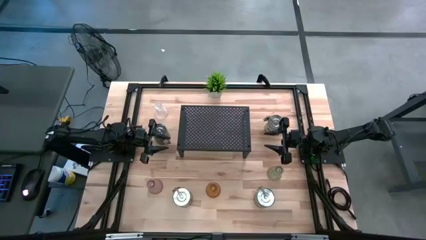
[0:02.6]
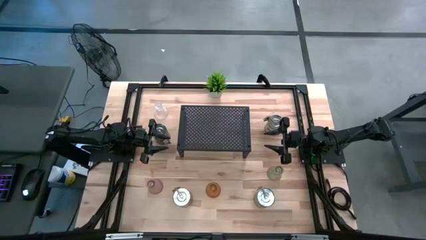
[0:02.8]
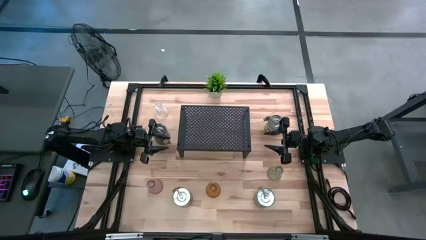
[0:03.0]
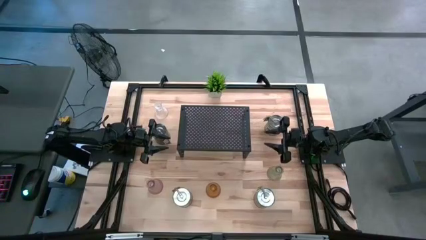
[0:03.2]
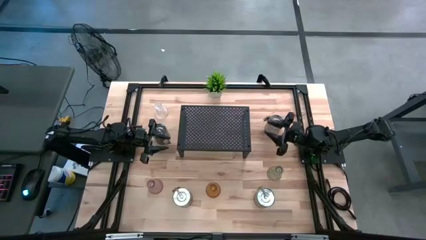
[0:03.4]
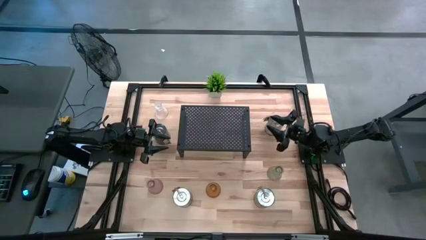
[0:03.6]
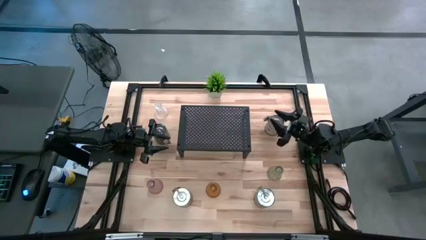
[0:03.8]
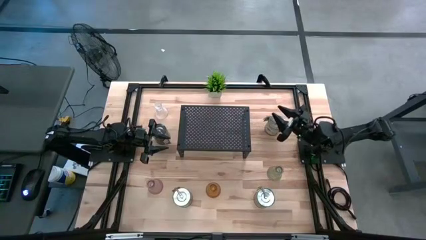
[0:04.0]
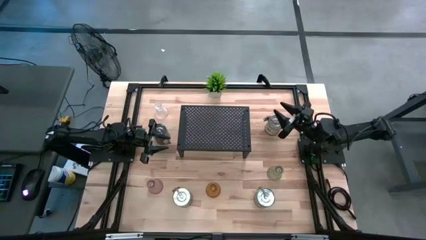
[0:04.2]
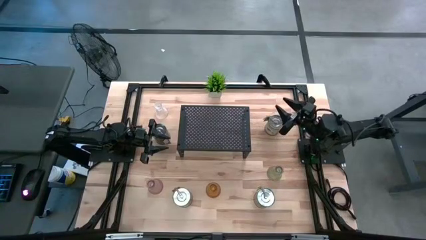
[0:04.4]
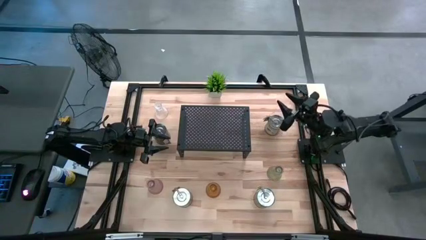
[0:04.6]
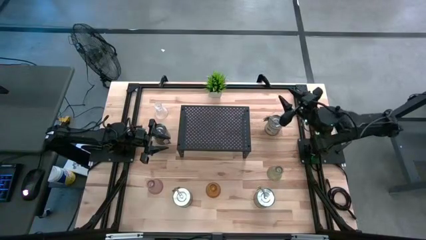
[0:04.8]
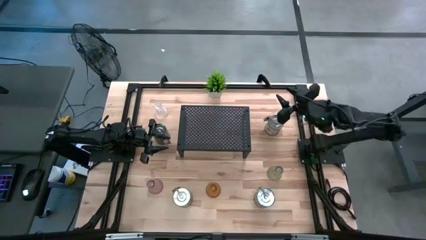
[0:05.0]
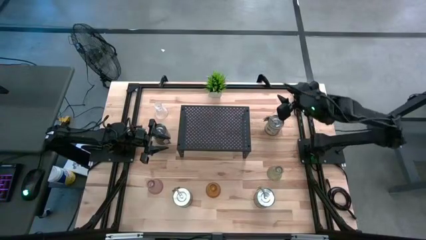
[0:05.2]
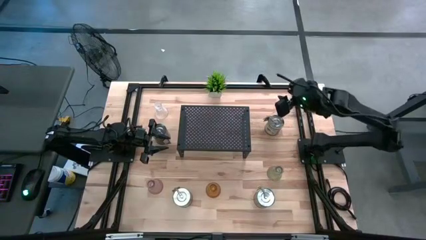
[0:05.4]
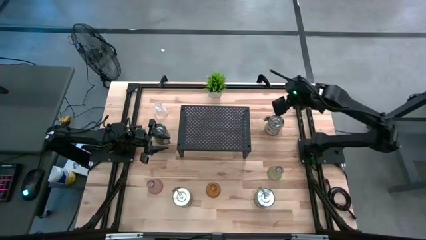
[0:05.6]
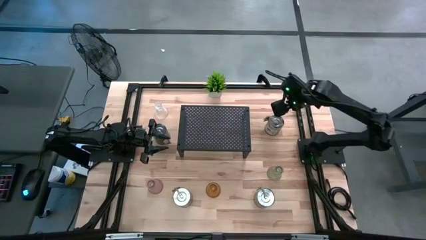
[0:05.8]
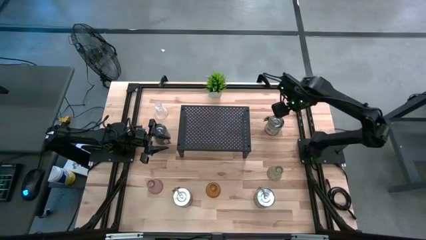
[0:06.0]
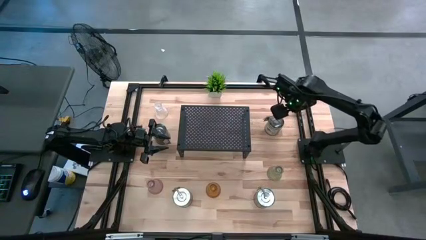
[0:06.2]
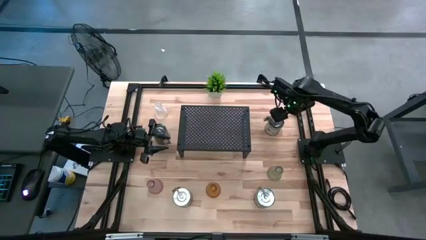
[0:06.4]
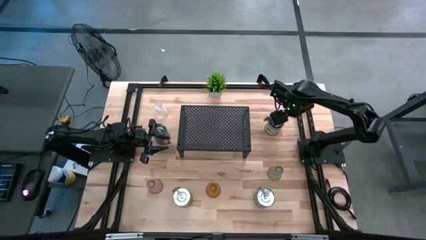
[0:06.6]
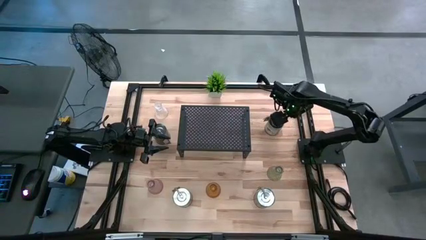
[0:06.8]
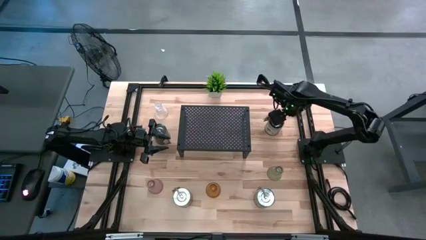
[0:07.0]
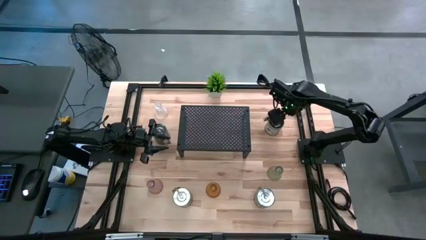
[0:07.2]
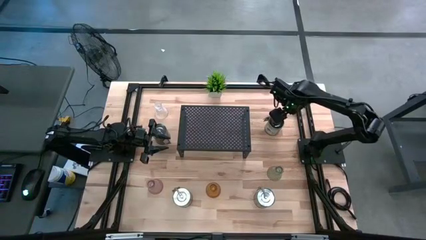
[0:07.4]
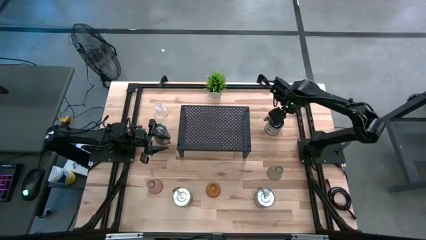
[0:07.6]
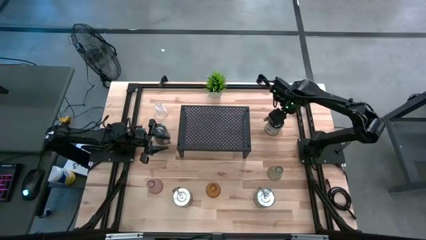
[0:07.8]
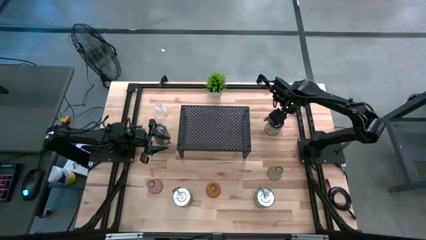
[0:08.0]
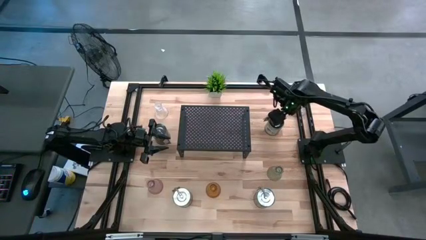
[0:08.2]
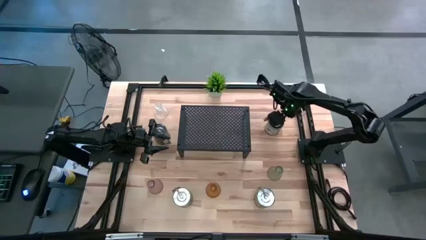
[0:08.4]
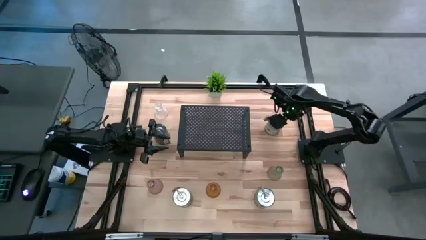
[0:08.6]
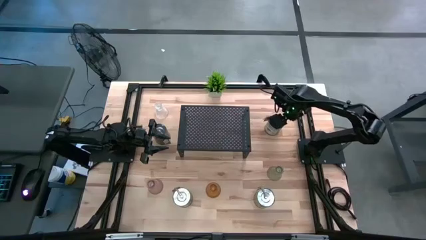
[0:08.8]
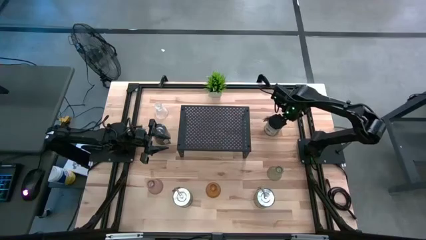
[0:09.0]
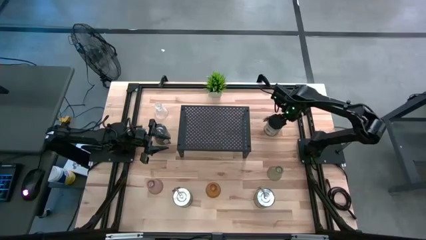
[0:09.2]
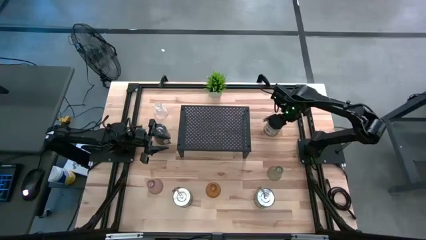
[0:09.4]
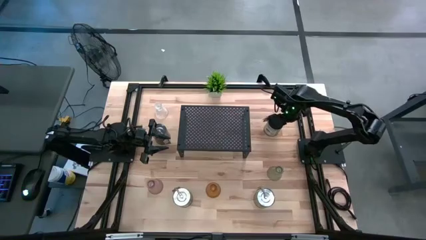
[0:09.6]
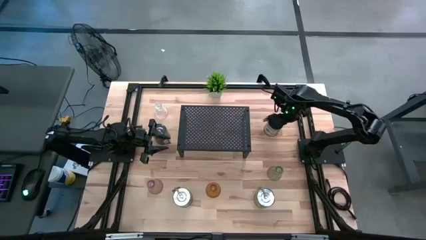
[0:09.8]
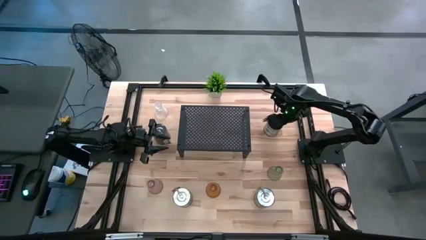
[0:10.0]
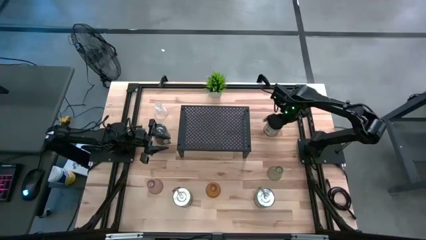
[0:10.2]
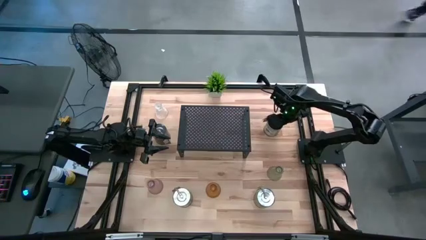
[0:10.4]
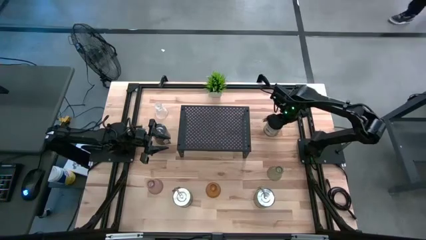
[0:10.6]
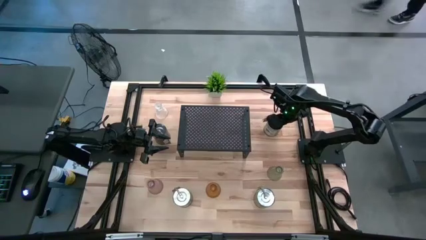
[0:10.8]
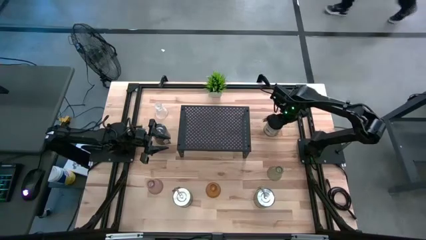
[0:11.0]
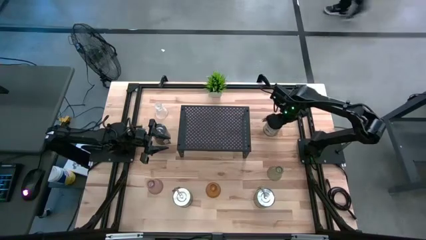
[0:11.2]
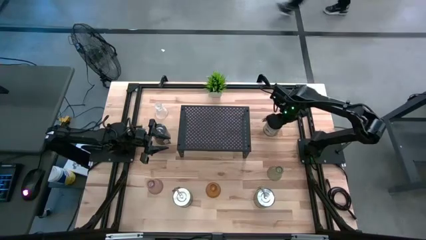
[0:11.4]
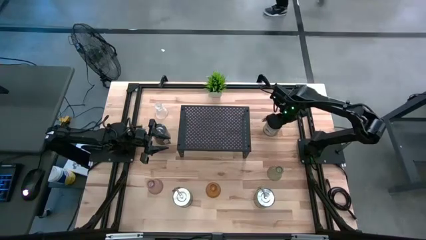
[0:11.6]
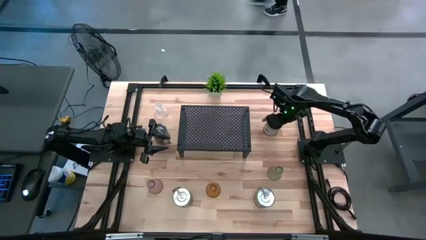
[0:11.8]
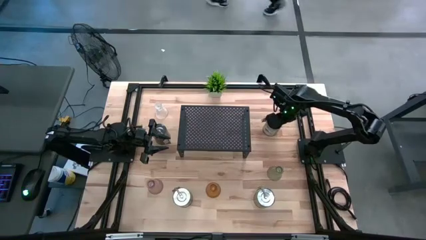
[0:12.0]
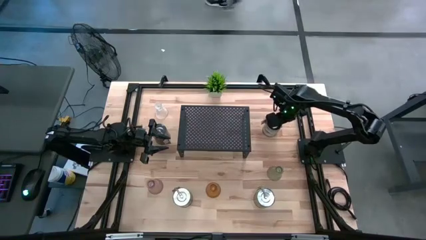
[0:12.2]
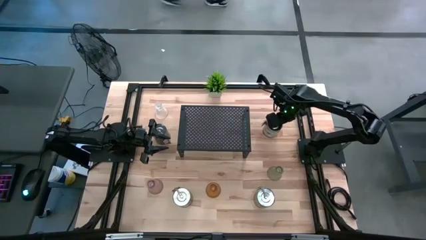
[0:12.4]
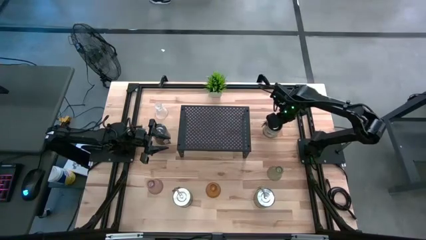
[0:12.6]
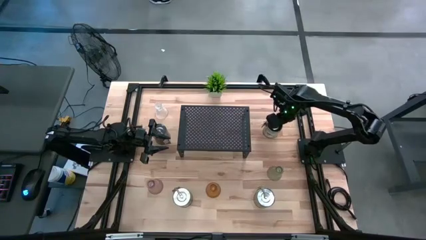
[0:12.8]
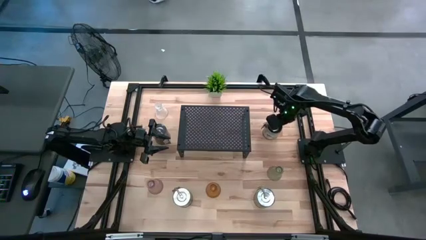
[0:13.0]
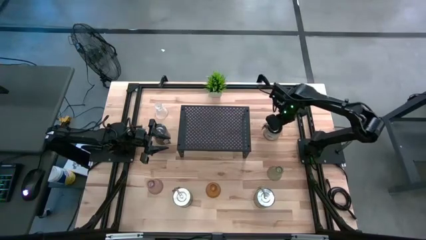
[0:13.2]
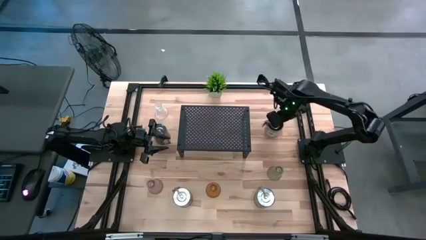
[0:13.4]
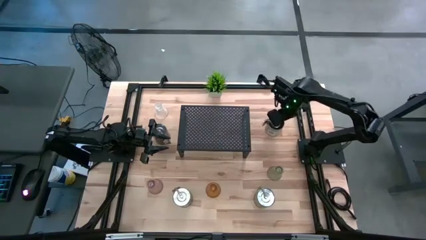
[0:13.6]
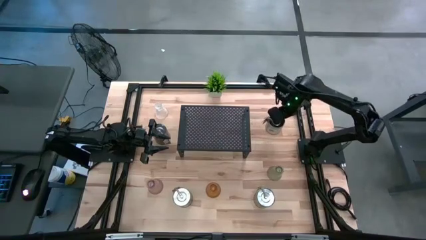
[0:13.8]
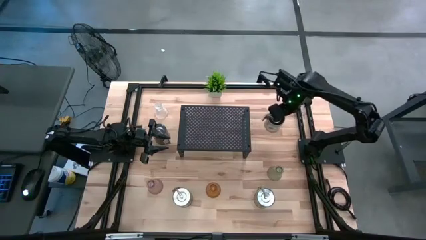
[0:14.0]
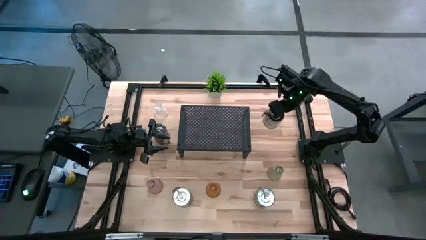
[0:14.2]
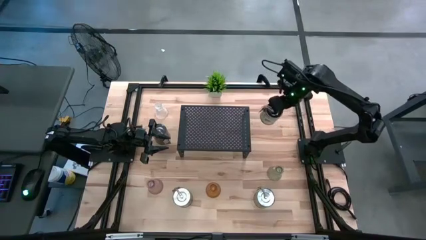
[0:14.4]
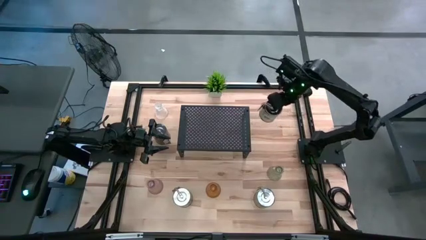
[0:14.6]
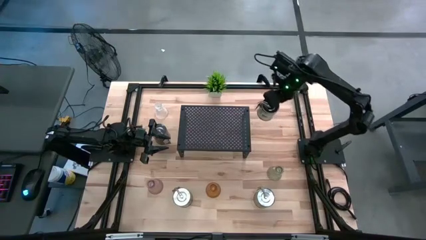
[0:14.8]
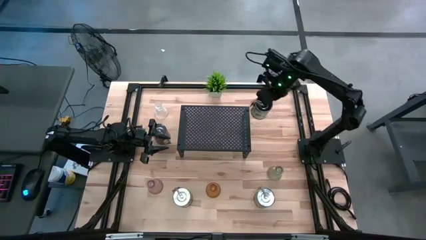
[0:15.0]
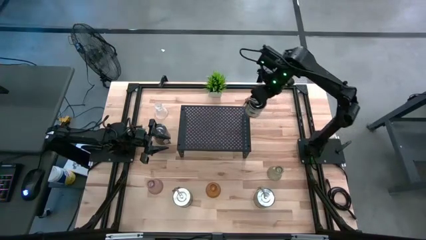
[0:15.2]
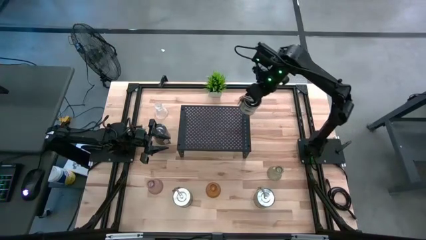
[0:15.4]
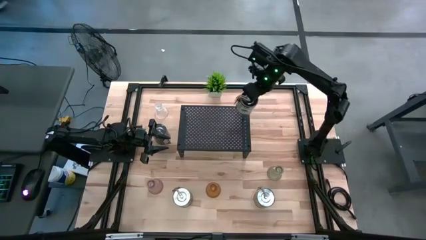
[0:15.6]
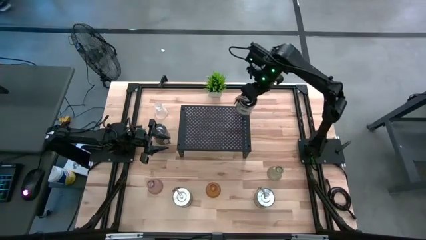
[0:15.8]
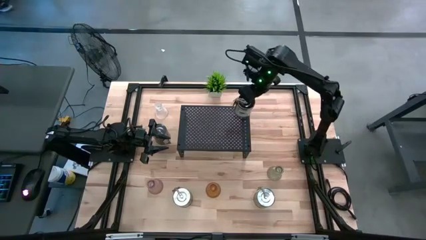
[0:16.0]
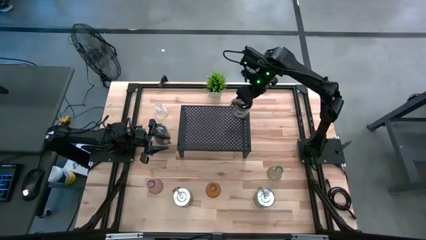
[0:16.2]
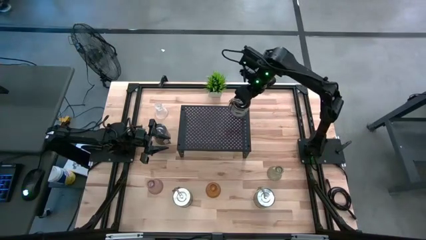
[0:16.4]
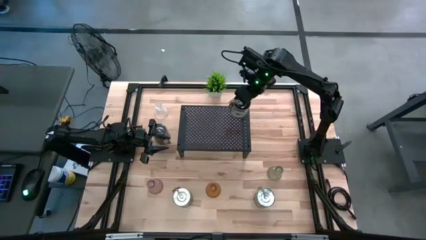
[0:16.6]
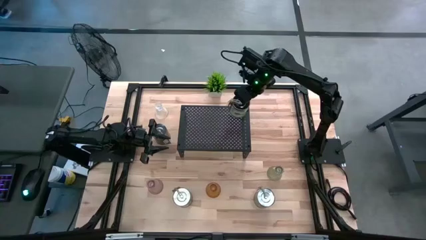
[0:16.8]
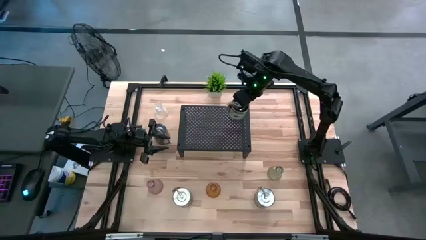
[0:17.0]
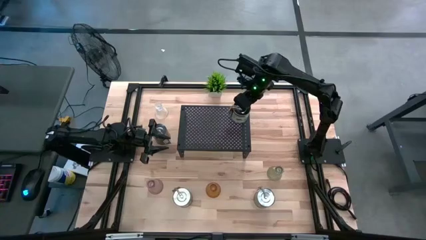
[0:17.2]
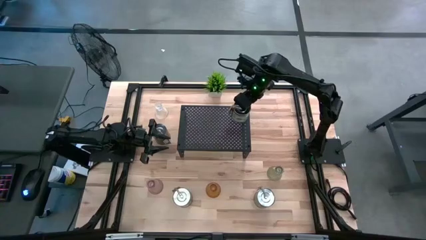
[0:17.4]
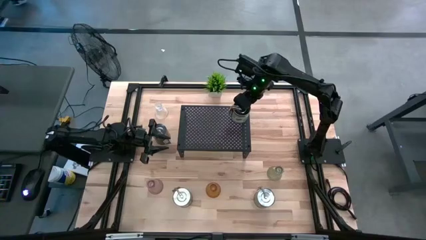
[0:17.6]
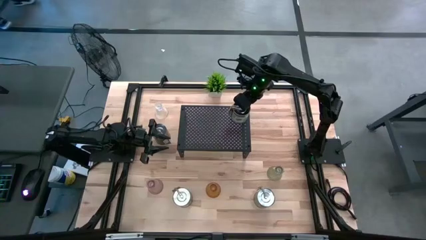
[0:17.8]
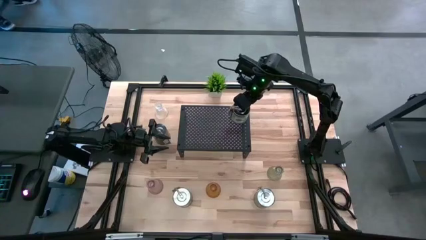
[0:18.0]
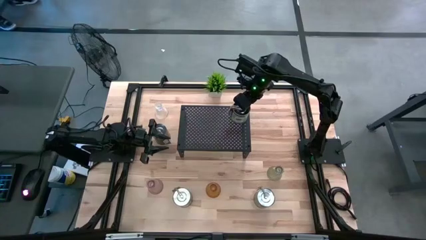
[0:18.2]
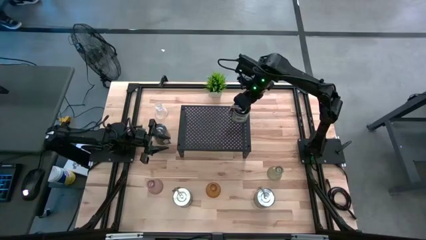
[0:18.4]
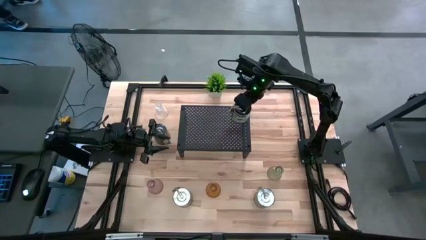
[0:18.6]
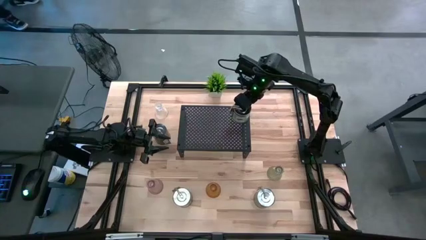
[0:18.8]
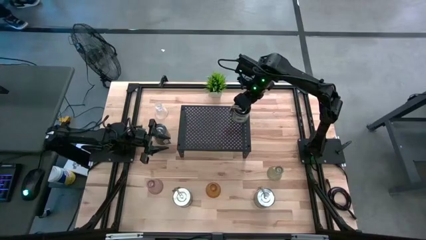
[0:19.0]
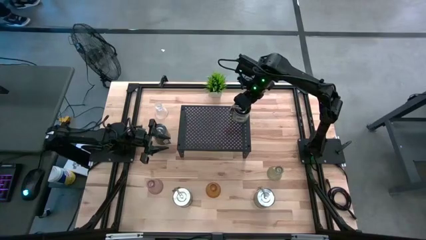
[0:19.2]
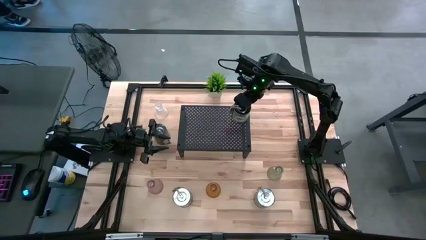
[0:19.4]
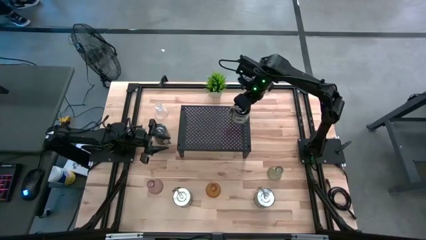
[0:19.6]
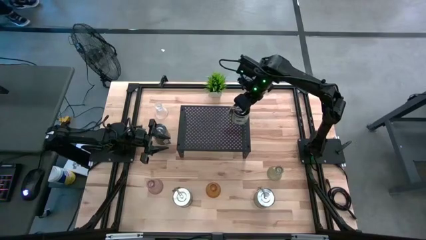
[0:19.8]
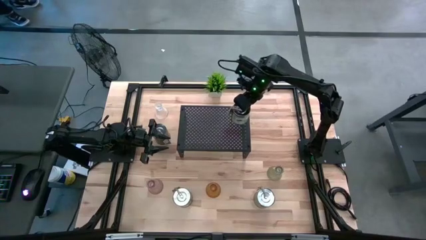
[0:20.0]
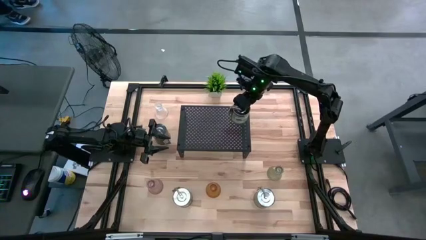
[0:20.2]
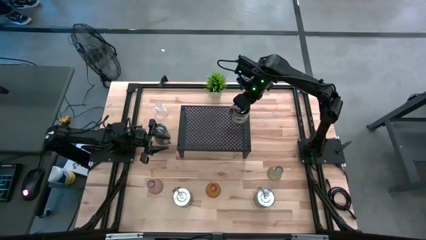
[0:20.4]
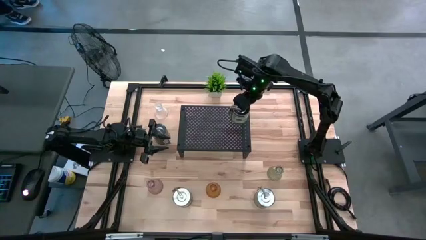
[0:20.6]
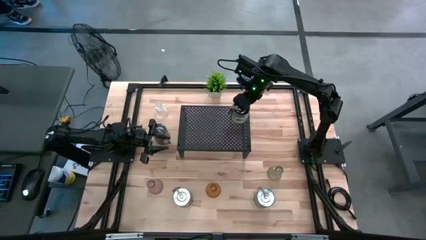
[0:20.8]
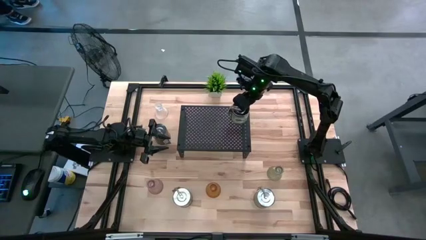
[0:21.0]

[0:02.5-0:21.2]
Task: Pick & Place candle stick holders
Put the green scented candle on the shelf
